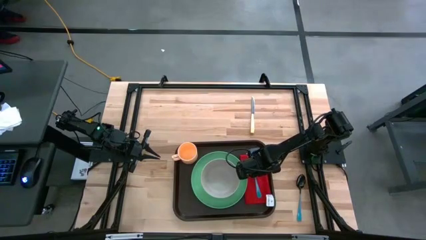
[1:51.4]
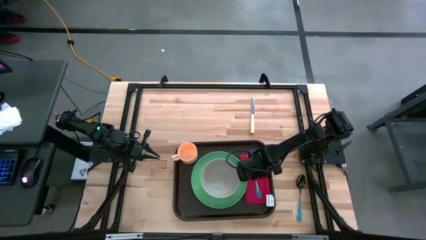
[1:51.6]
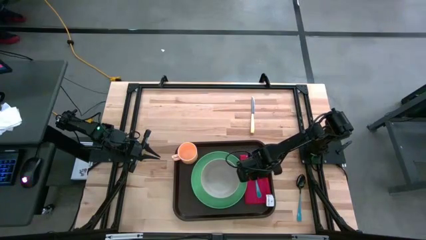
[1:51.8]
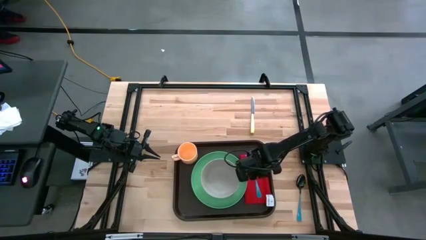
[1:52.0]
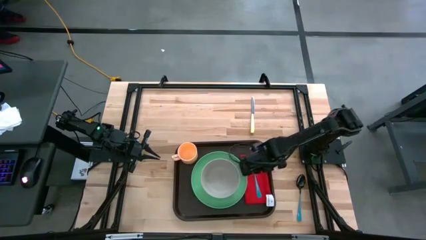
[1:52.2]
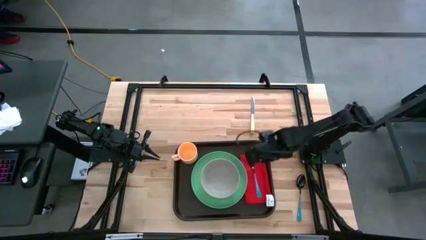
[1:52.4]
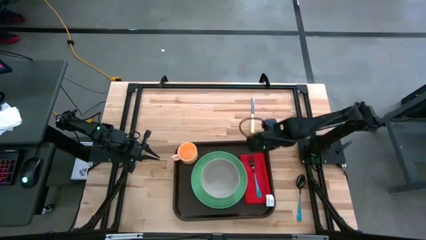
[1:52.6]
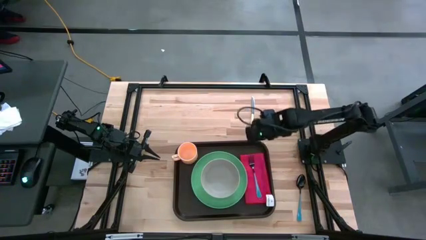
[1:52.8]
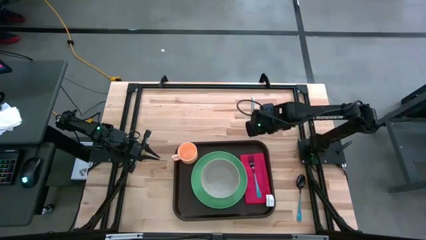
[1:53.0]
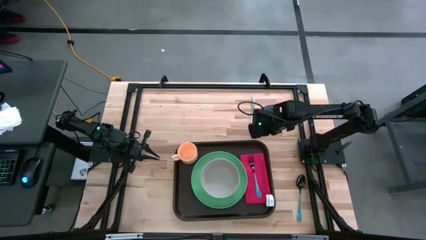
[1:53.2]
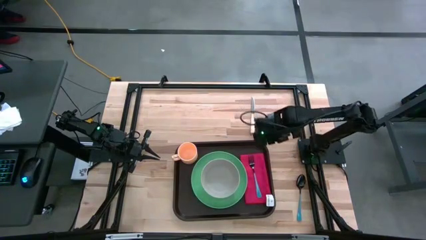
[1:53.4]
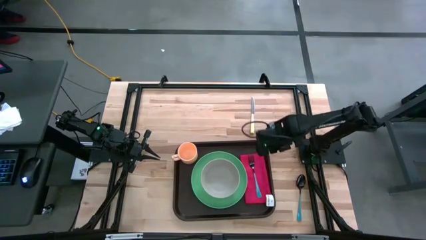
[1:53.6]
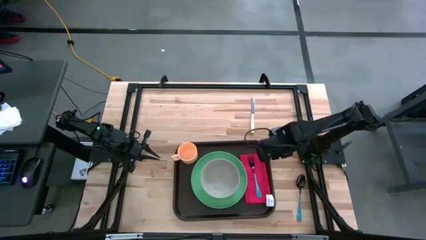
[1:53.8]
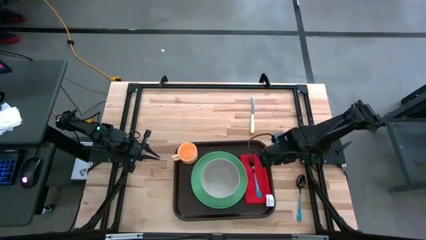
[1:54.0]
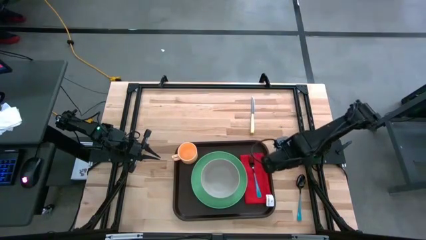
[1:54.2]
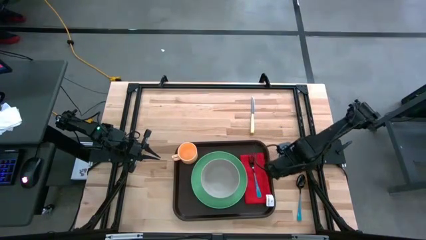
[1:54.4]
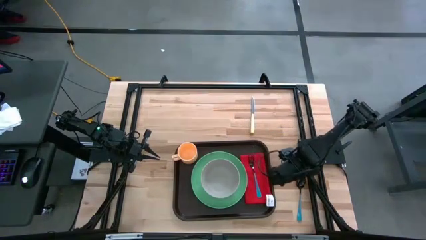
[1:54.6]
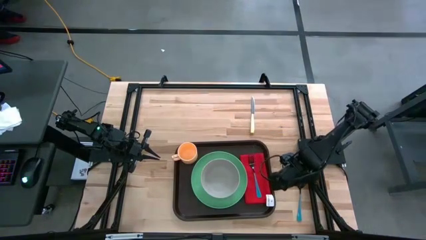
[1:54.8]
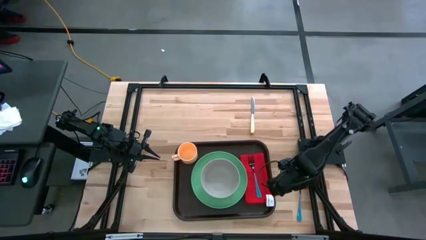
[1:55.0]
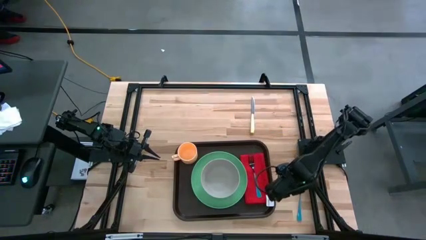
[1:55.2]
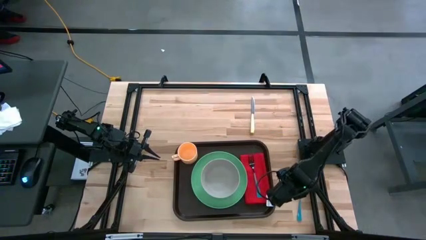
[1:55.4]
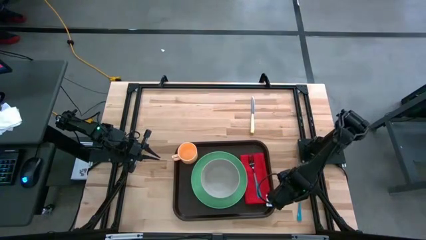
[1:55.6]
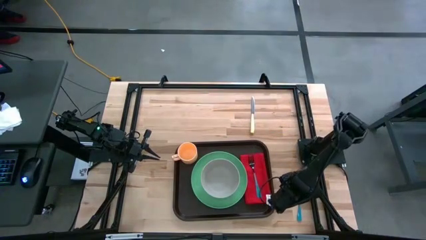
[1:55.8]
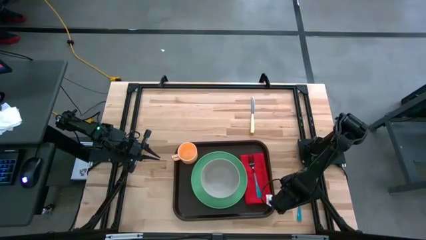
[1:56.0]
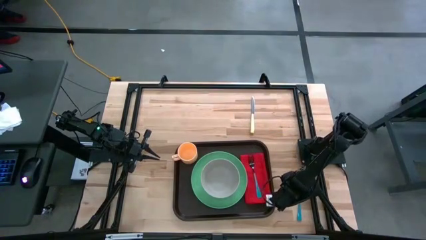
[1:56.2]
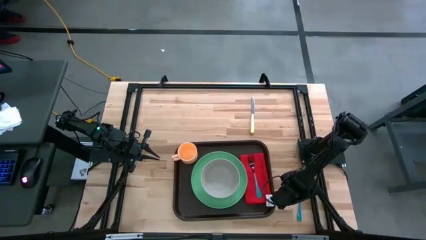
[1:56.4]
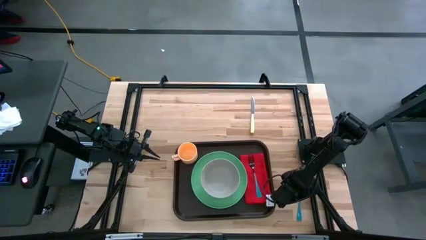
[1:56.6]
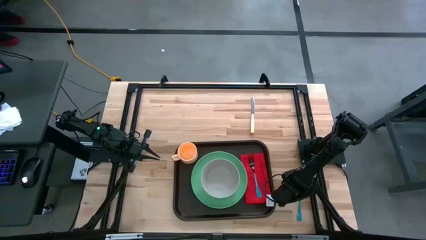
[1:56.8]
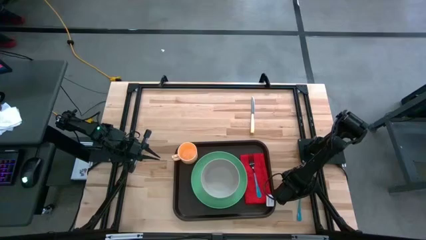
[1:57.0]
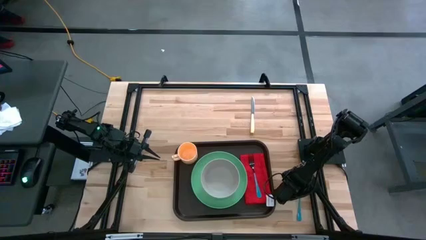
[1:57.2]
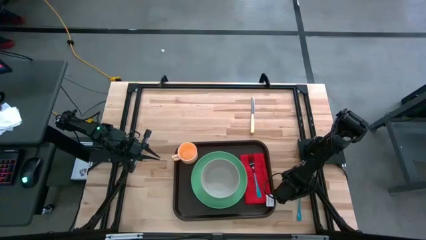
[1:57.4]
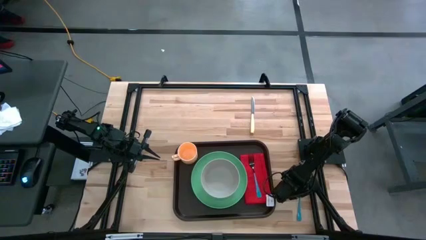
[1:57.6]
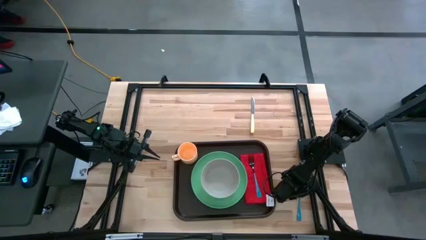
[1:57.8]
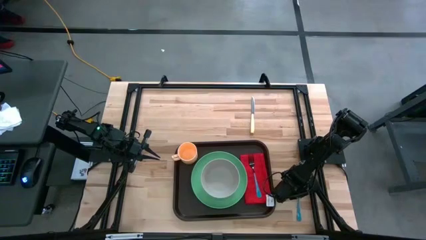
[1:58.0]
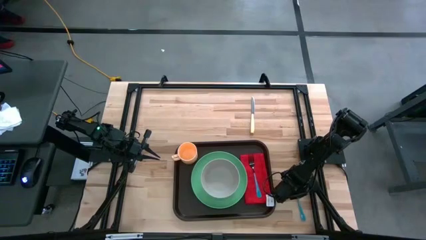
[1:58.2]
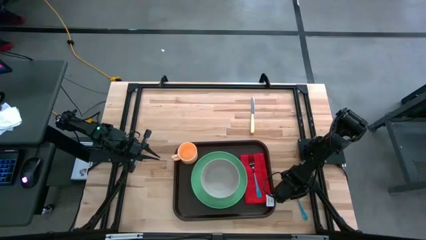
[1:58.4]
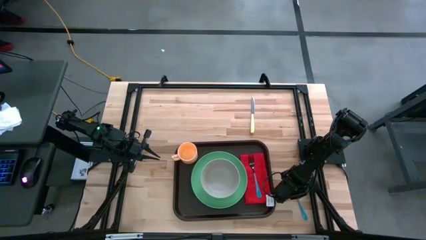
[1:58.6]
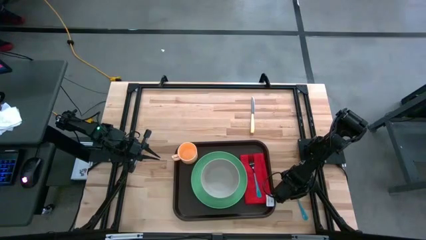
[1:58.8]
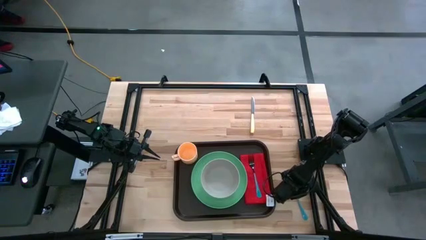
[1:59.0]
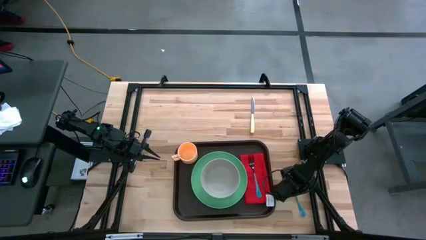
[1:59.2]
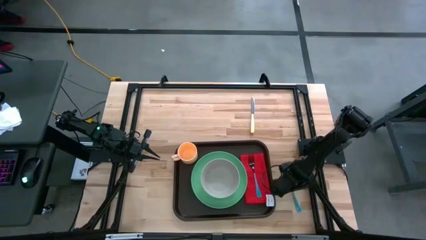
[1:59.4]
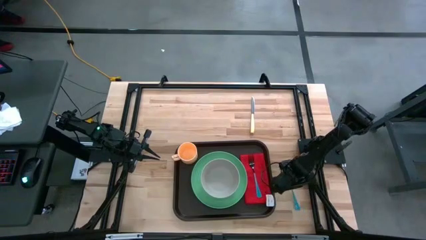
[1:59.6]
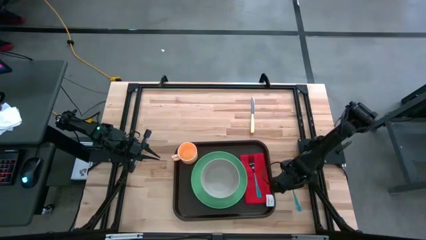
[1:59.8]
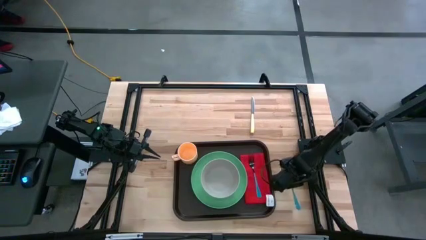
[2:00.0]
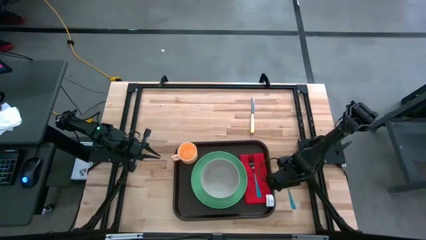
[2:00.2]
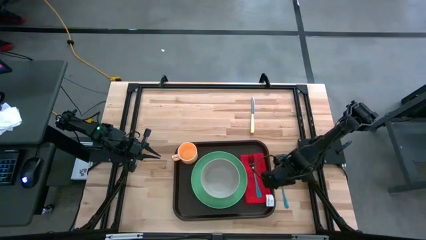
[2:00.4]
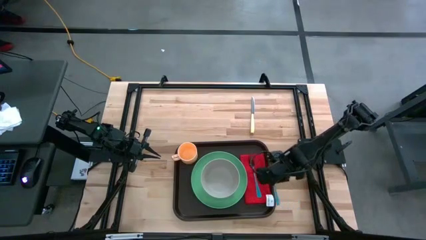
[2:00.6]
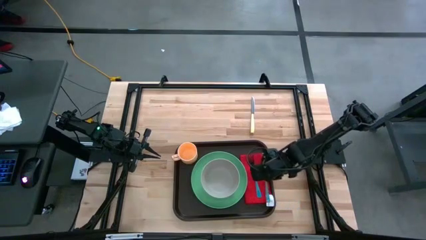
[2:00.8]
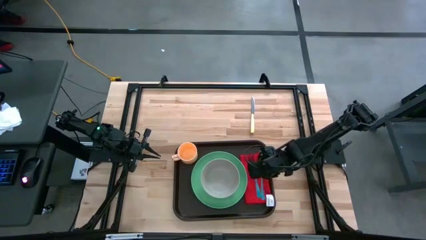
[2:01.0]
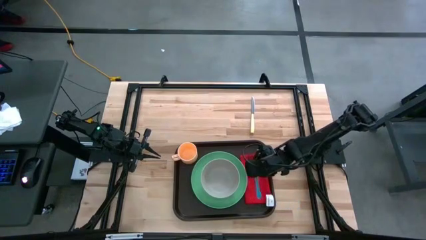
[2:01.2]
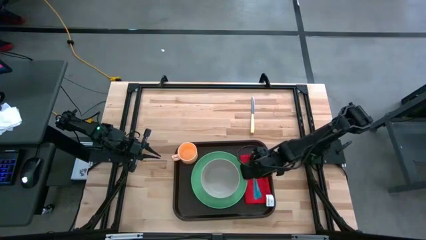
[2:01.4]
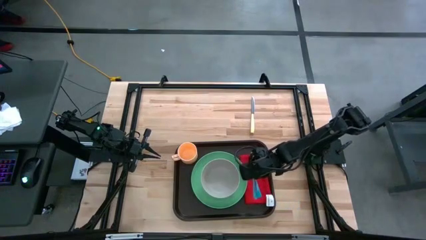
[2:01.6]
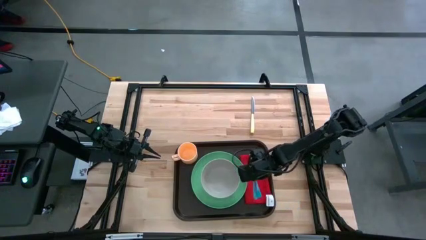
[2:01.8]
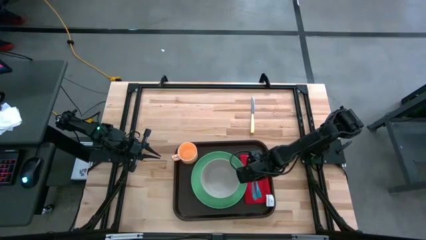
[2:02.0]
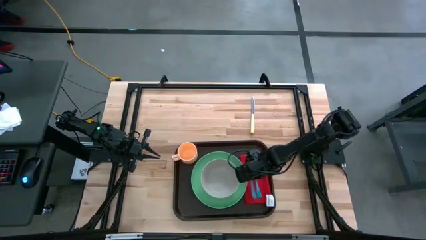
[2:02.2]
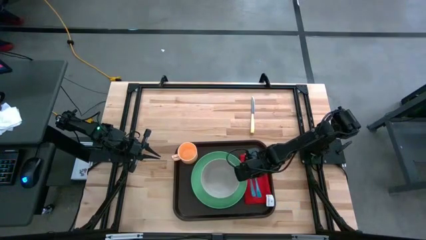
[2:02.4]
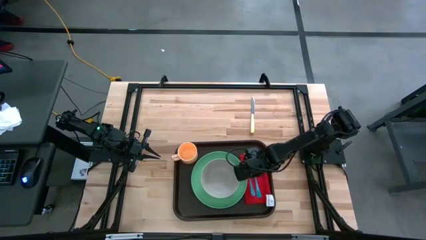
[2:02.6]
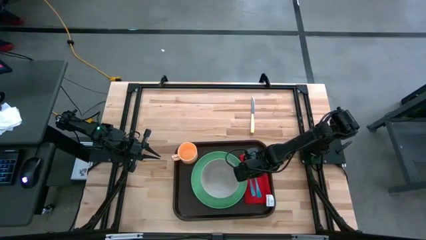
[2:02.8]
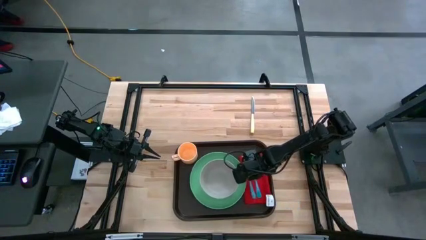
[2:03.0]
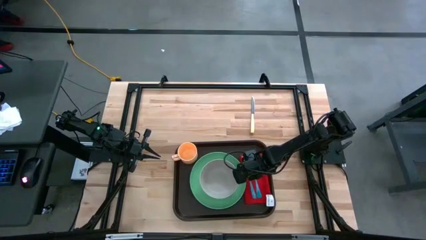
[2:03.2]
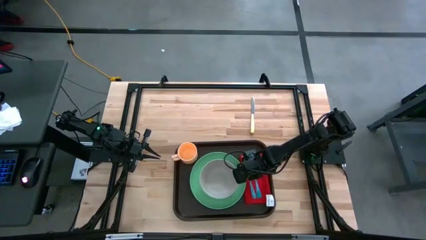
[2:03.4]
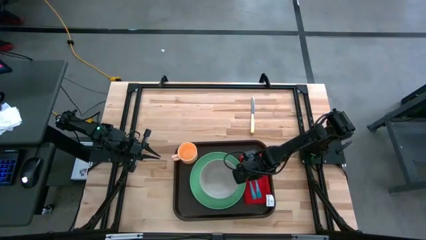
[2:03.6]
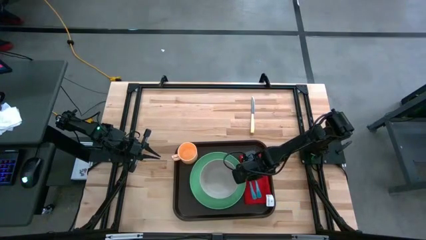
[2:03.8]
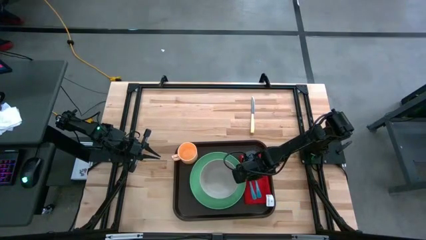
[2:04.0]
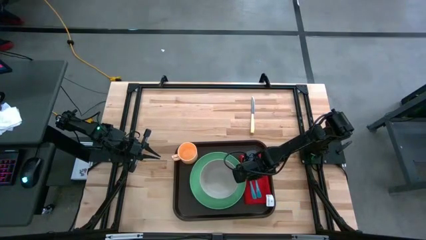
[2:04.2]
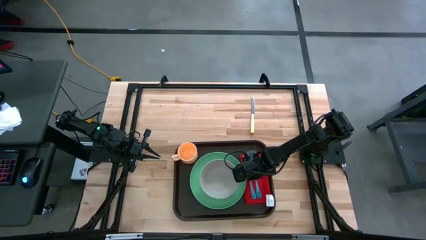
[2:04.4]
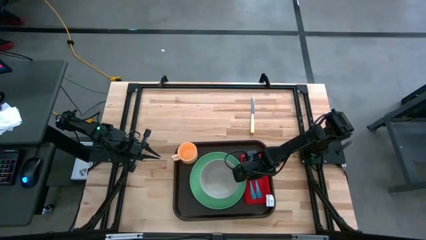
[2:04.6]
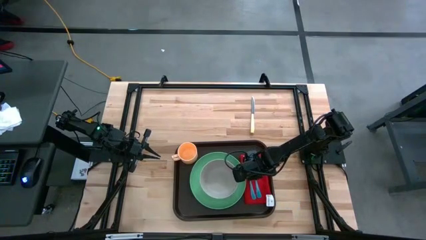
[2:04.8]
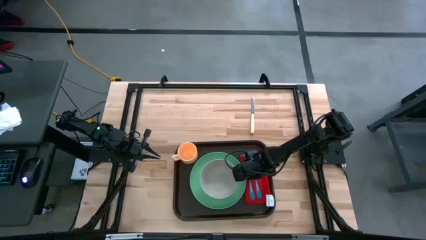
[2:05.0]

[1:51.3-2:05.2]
Task: Set up tray
Put the blue spoon to the right of the blue fork on the red napkin on the brown serving tray
